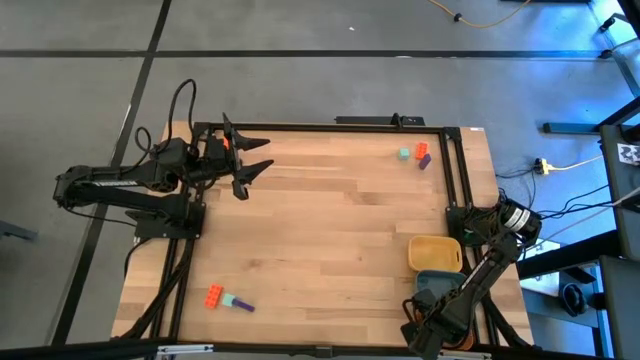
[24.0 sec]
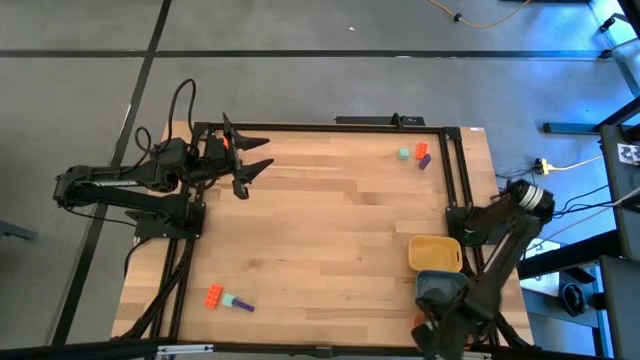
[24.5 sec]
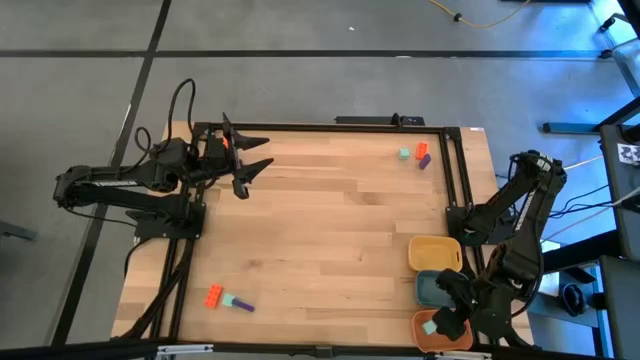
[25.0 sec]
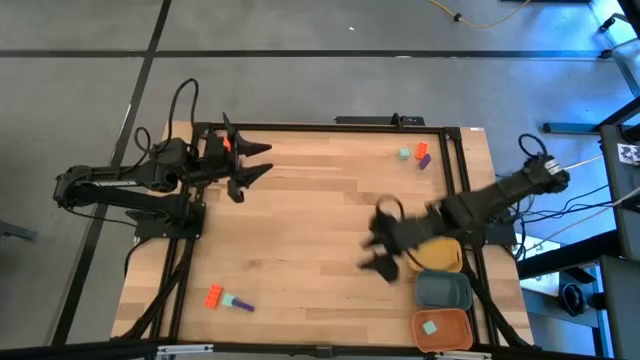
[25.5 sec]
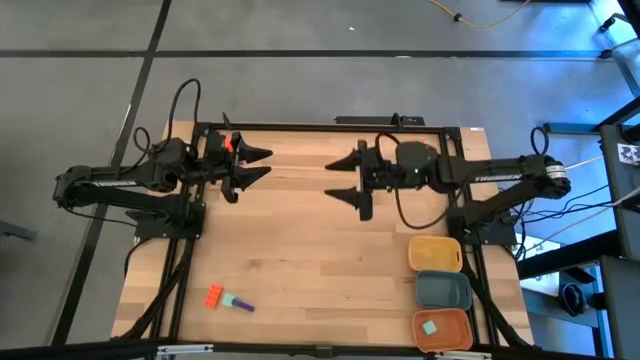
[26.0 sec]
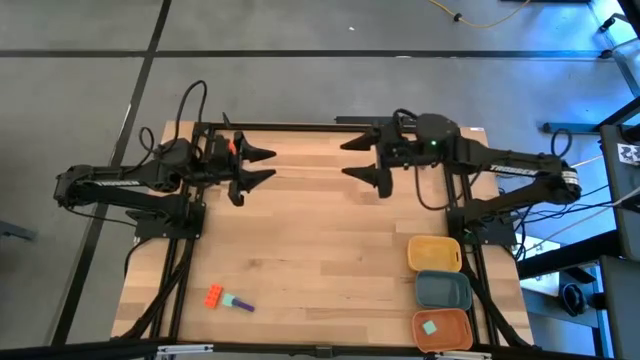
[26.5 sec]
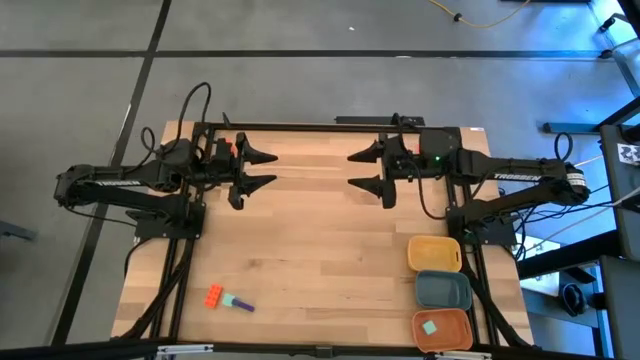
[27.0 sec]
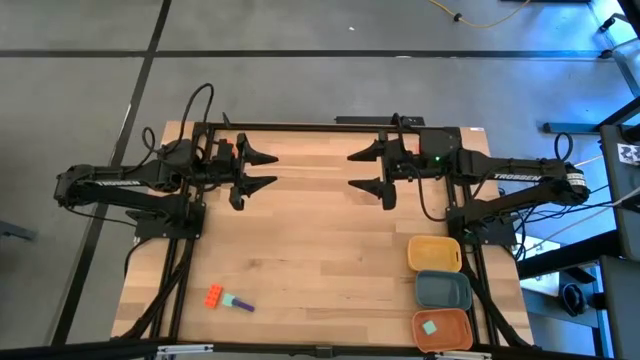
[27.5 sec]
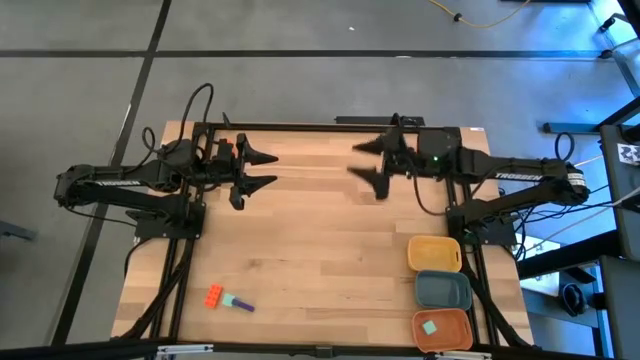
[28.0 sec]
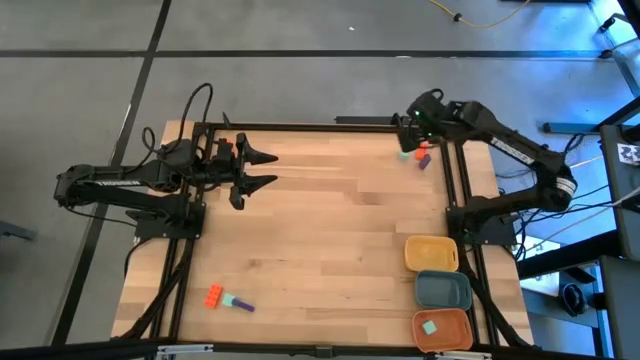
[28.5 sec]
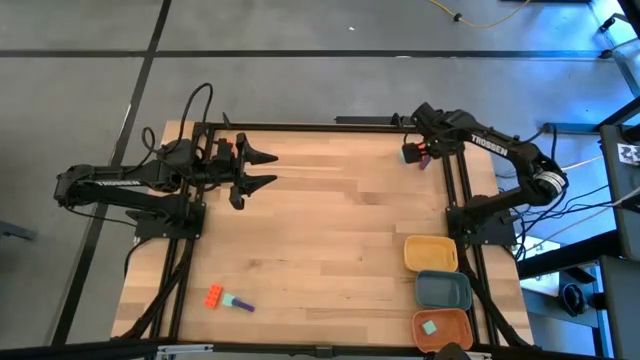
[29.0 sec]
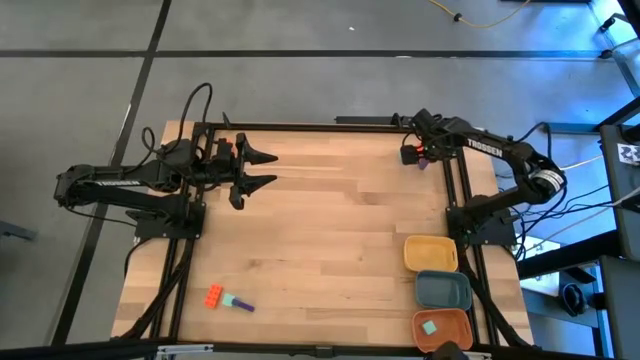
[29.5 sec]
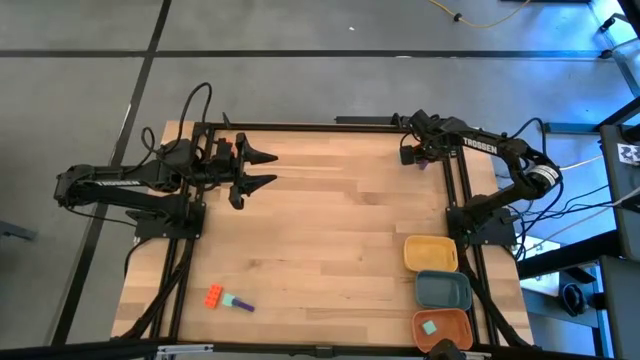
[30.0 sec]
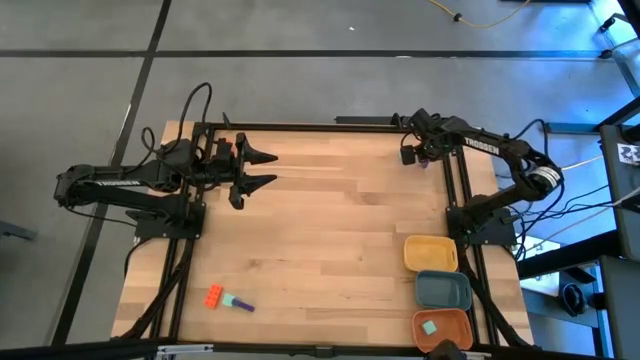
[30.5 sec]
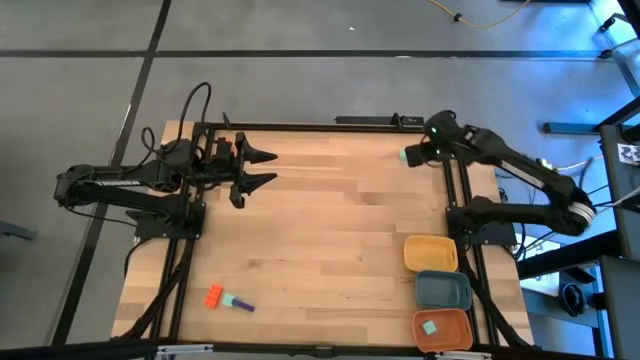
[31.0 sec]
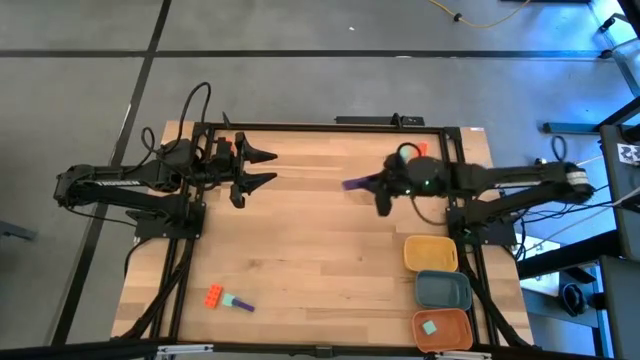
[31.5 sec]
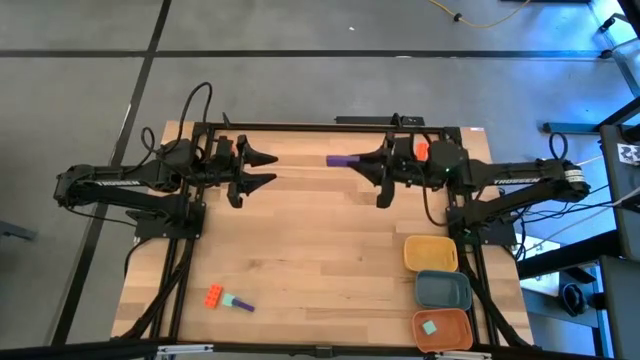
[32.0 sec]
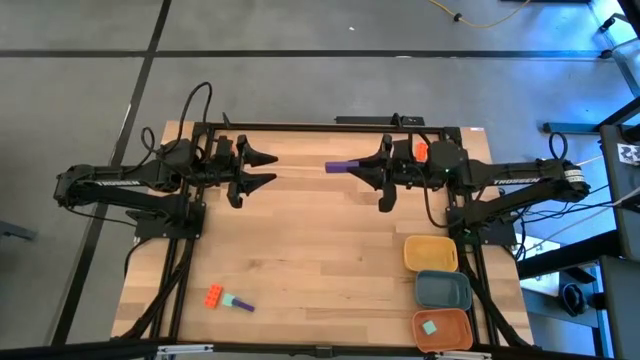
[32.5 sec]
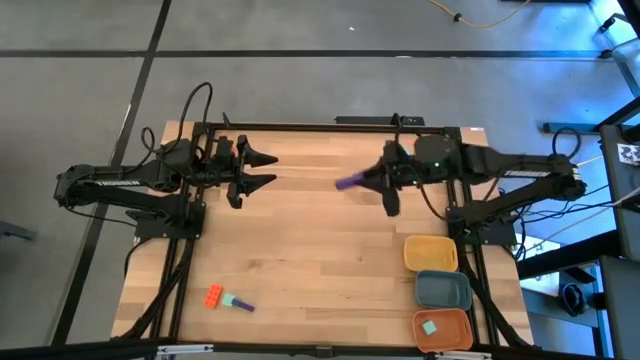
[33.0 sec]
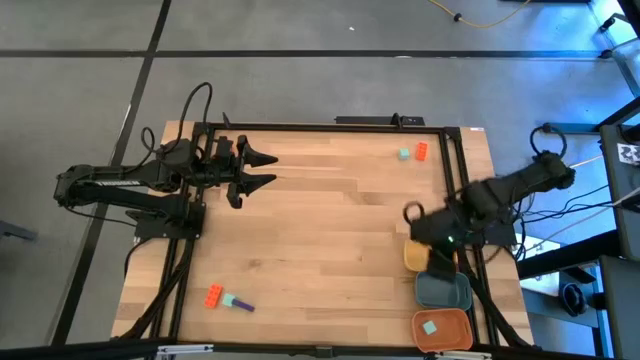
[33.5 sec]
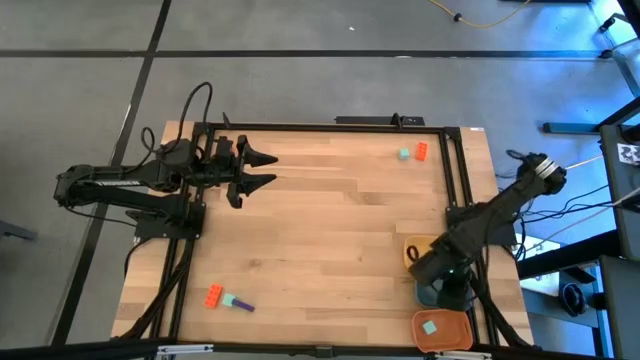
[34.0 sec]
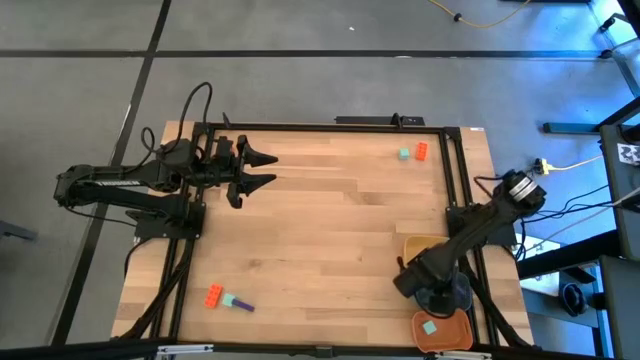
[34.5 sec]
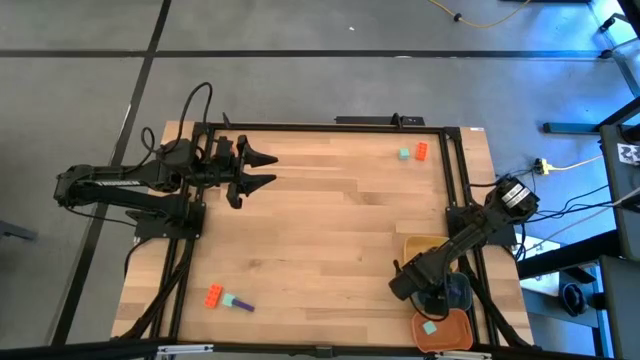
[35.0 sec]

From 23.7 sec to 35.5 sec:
Task: Sort & place blocks by color
Put the top right violet block into the blue bin

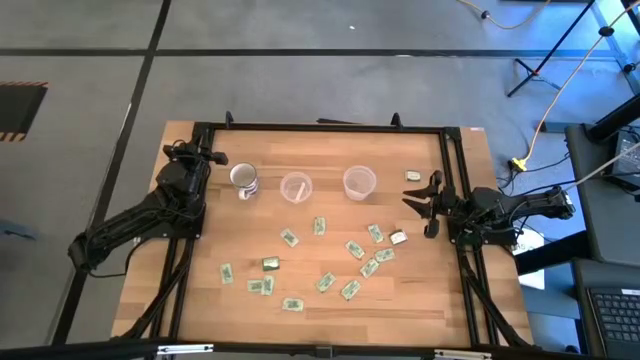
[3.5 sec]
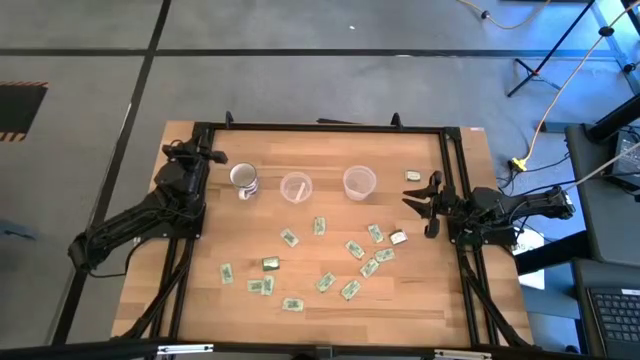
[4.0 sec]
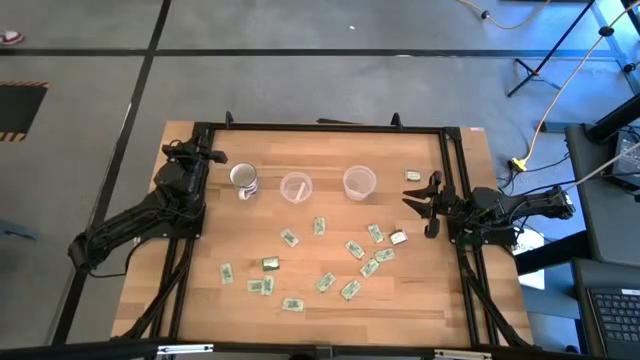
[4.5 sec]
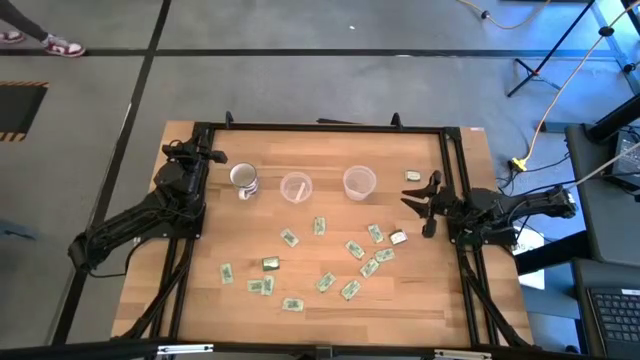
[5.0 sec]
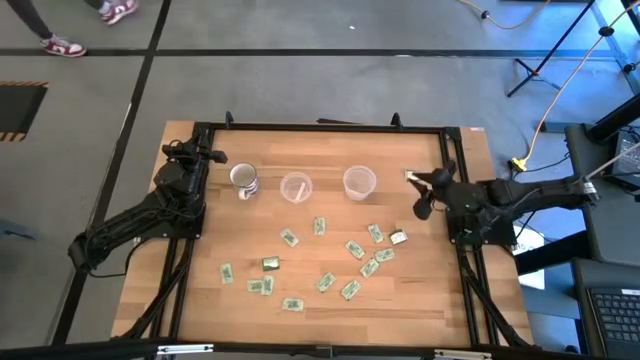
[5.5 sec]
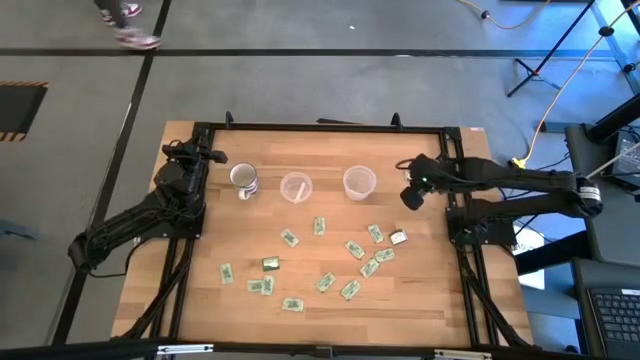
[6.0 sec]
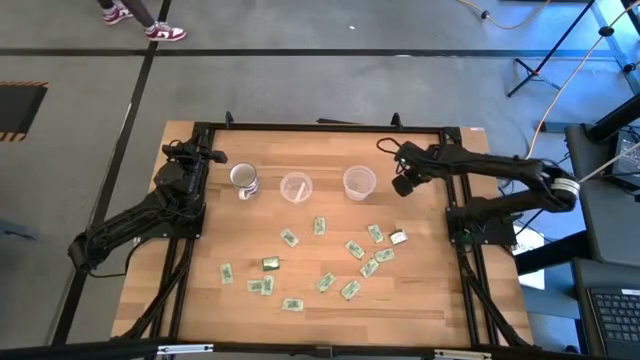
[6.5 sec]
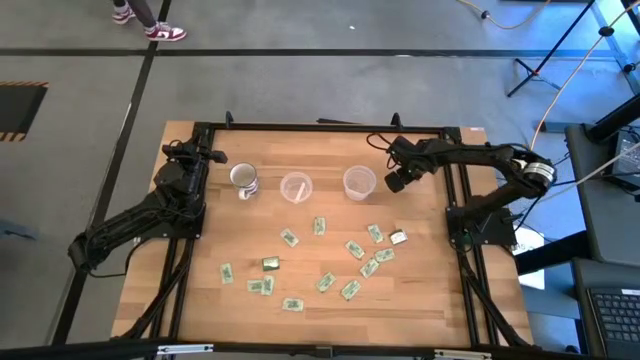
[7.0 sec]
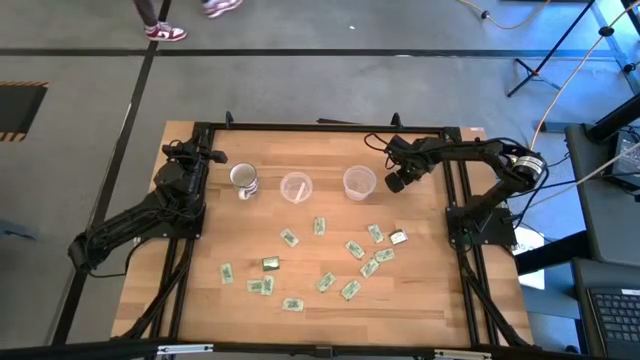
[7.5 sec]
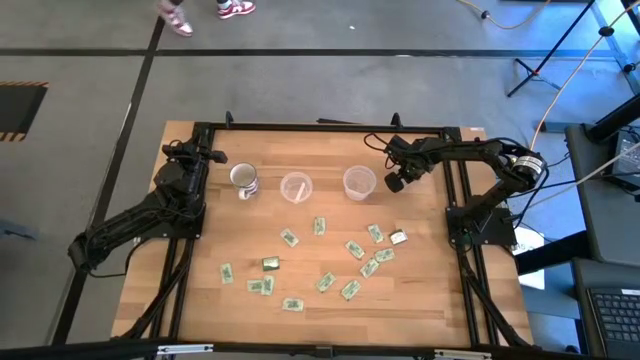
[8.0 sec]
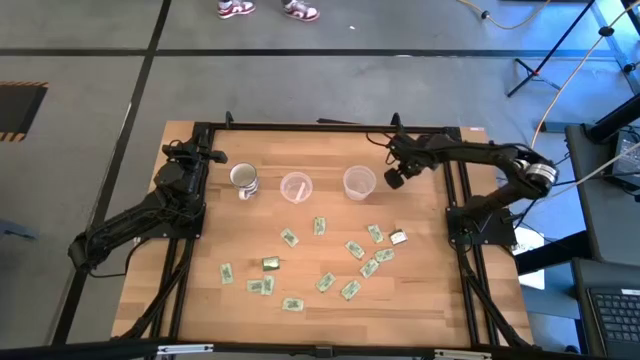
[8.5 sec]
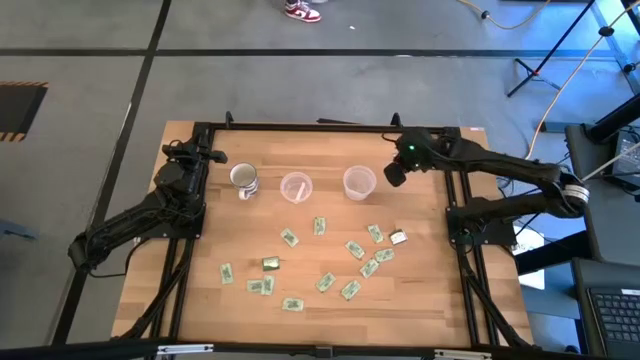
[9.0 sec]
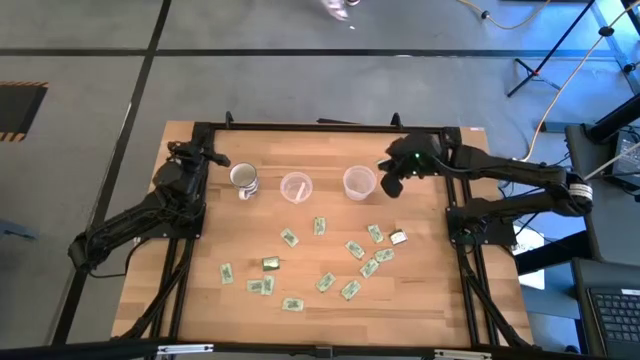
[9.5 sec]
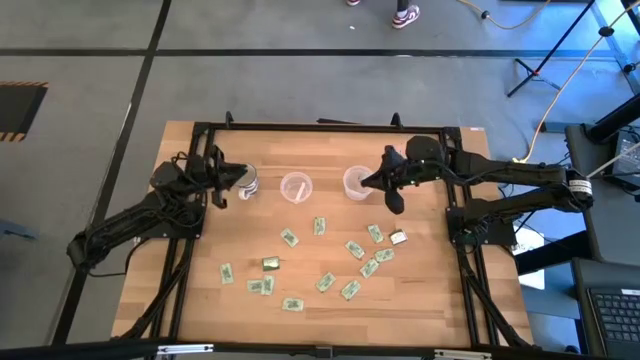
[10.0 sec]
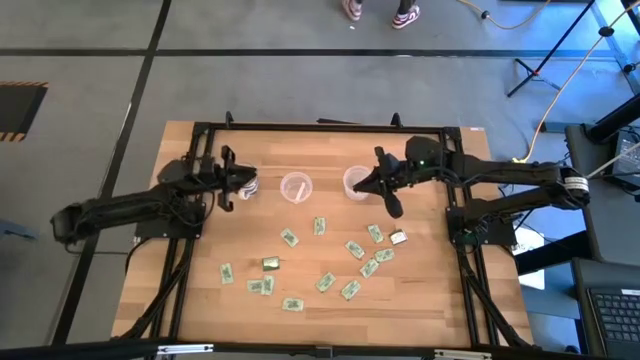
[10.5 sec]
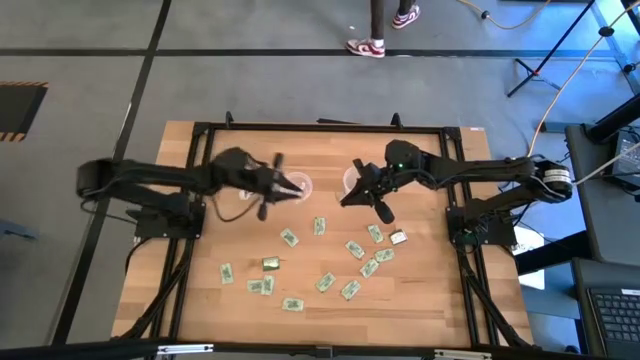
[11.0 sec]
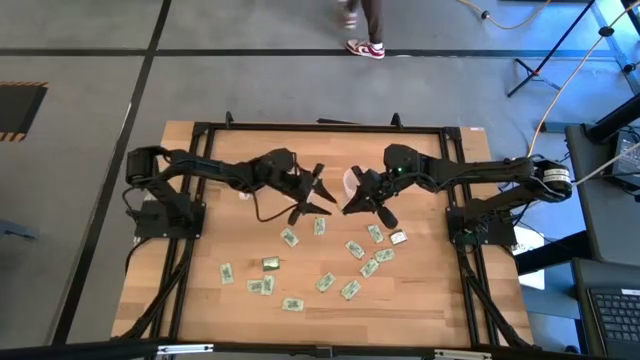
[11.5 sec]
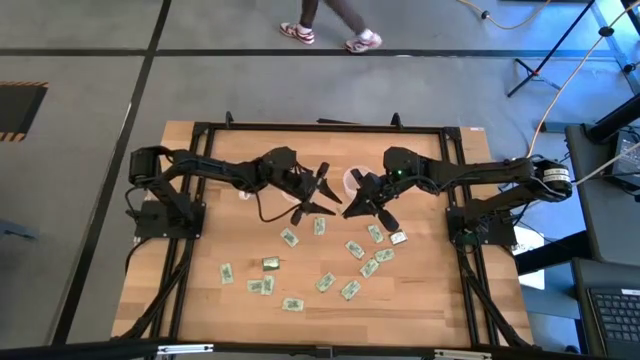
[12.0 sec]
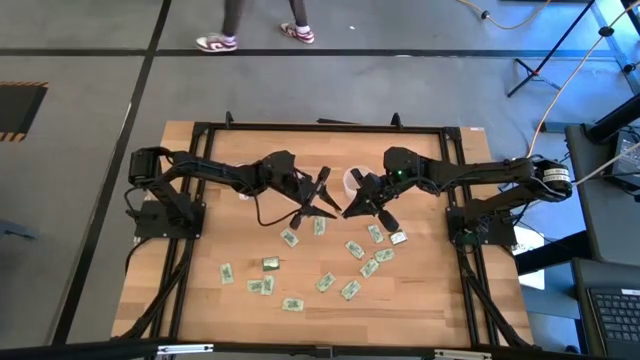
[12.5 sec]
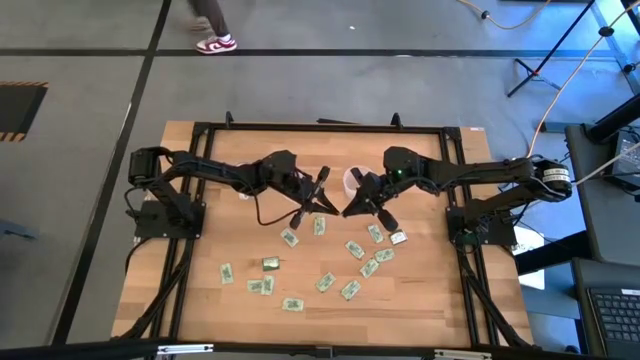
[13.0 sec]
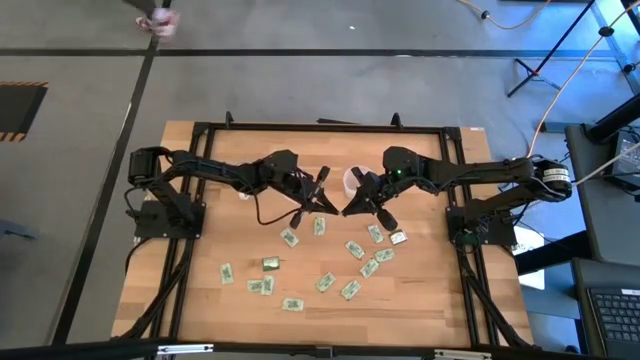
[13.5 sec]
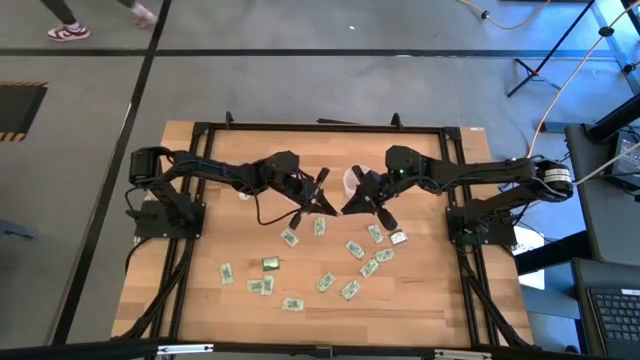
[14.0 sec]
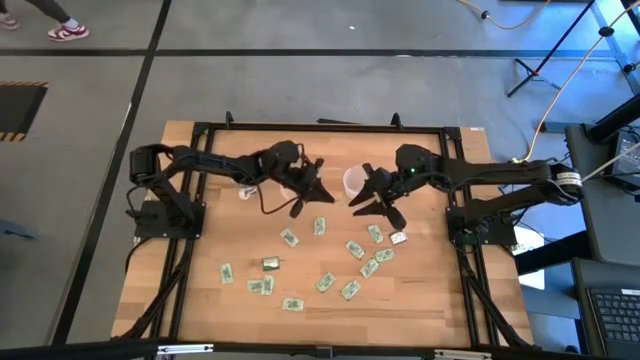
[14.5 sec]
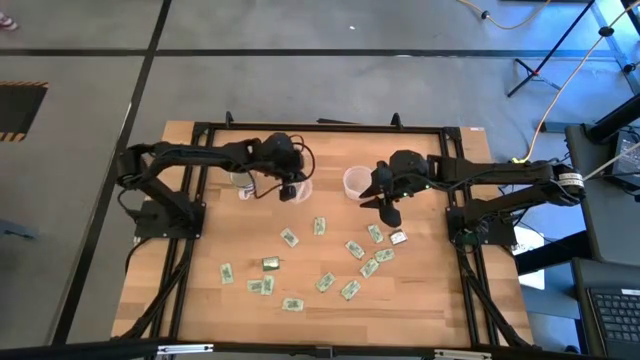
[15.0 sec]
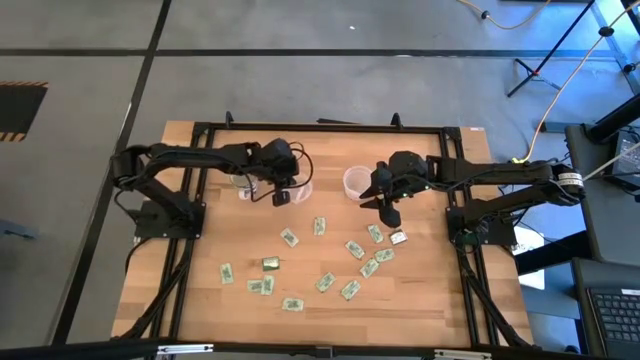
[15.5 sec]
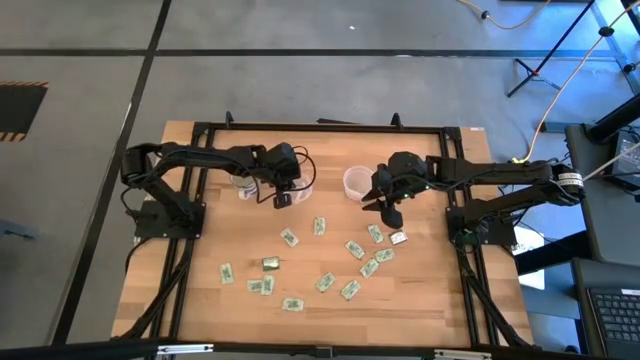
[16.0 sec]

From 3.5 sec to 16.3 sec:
Task: Pick and place items into bin
Put the green truvia packet into the left transparent bin
